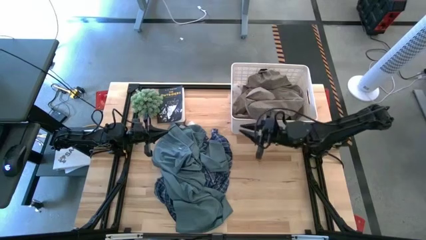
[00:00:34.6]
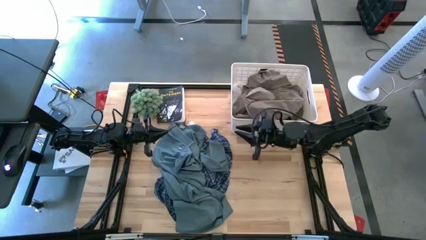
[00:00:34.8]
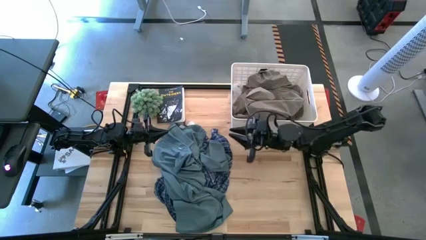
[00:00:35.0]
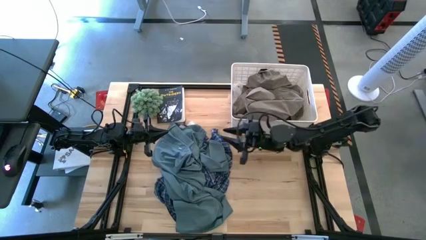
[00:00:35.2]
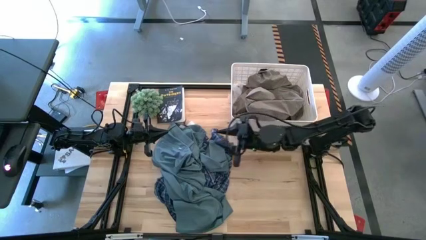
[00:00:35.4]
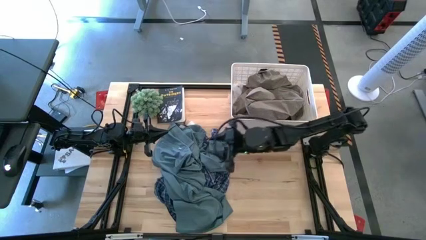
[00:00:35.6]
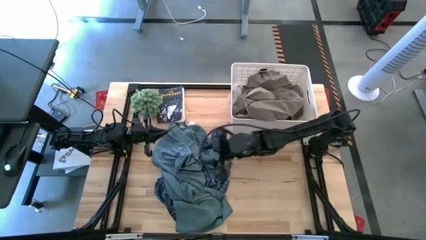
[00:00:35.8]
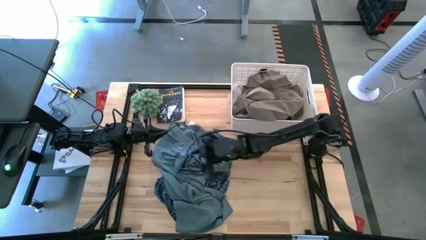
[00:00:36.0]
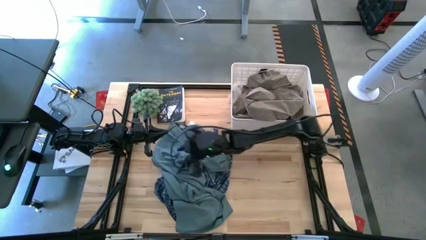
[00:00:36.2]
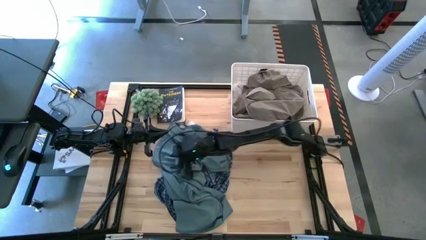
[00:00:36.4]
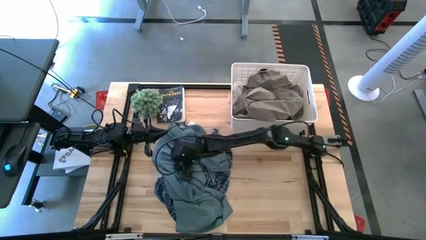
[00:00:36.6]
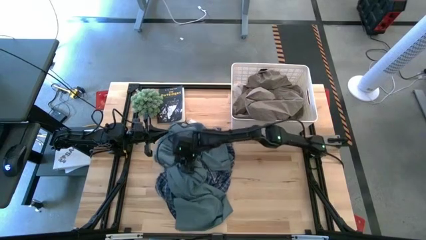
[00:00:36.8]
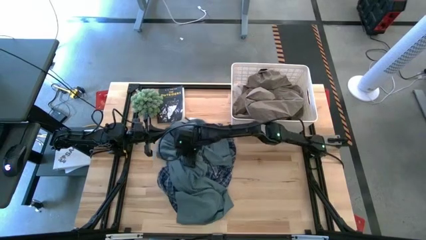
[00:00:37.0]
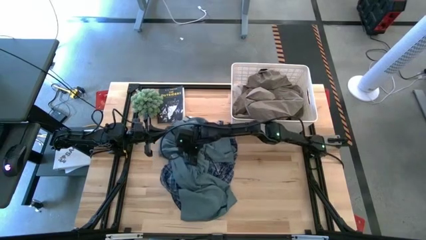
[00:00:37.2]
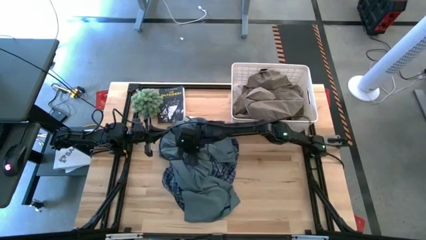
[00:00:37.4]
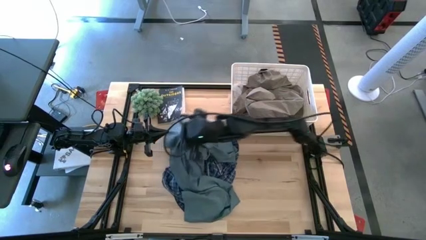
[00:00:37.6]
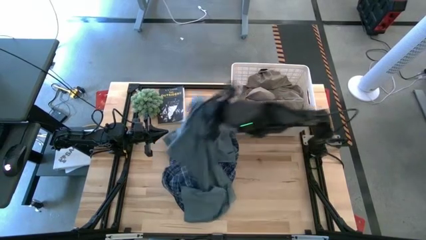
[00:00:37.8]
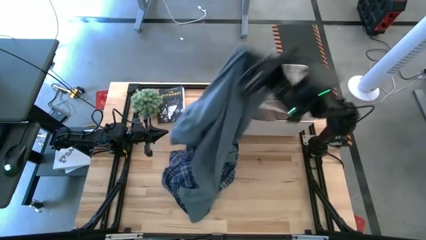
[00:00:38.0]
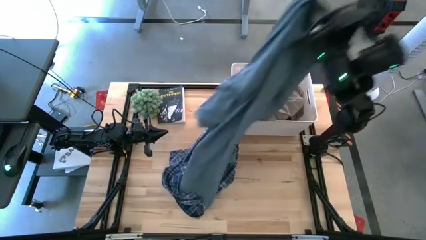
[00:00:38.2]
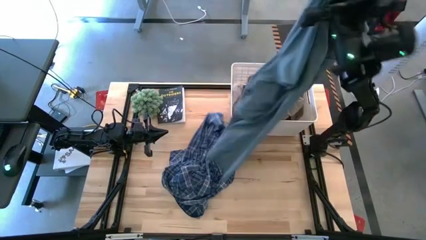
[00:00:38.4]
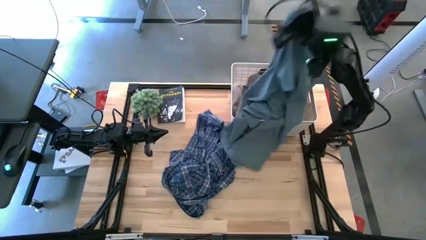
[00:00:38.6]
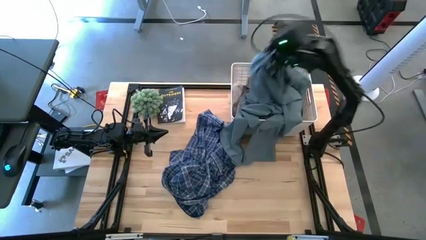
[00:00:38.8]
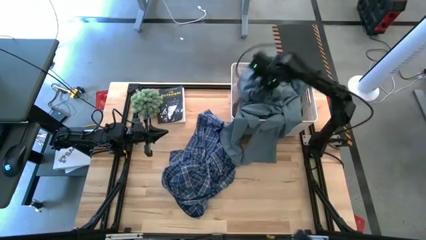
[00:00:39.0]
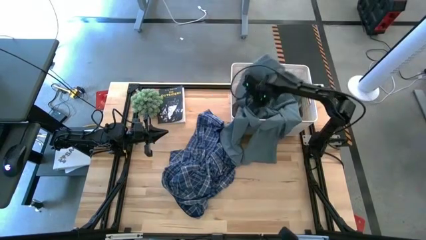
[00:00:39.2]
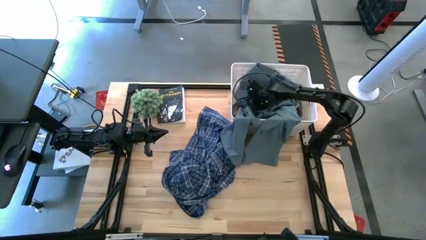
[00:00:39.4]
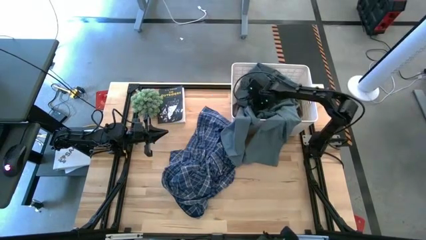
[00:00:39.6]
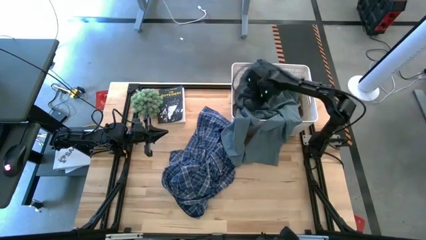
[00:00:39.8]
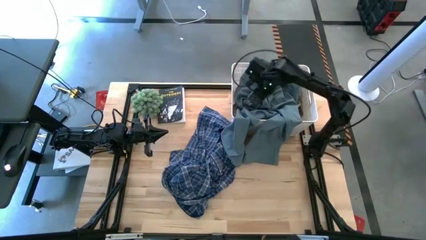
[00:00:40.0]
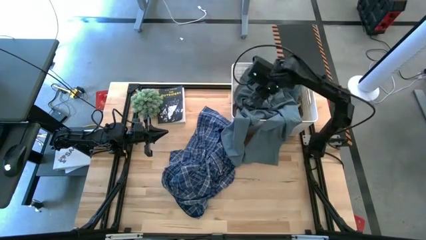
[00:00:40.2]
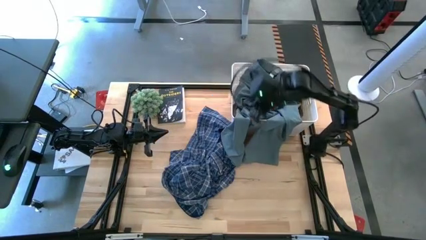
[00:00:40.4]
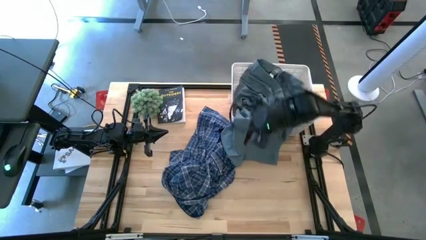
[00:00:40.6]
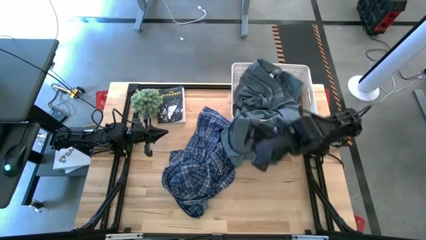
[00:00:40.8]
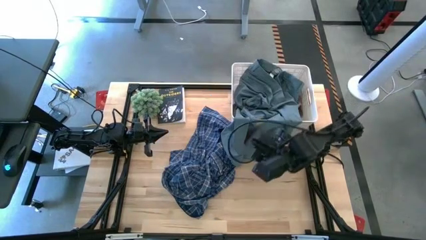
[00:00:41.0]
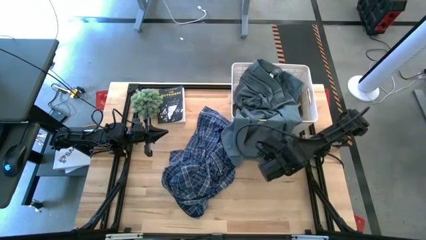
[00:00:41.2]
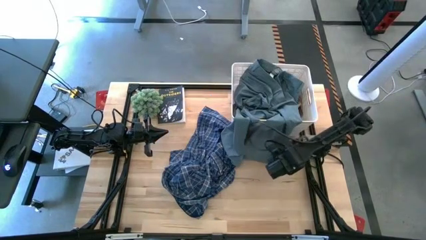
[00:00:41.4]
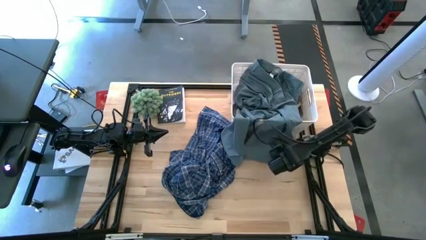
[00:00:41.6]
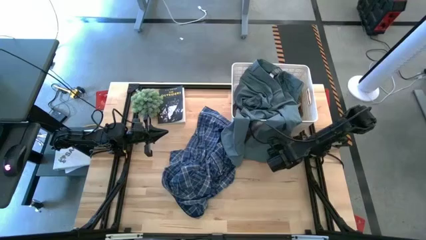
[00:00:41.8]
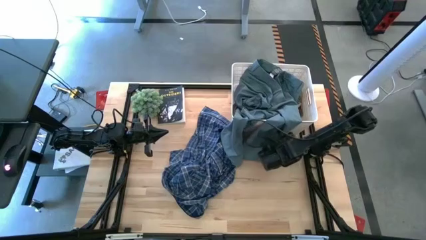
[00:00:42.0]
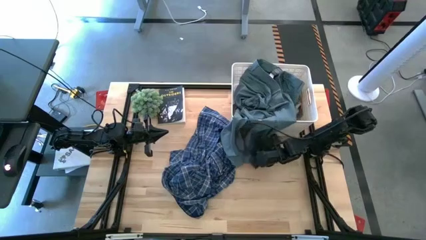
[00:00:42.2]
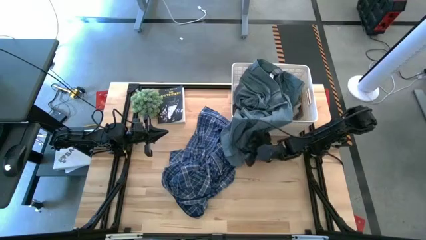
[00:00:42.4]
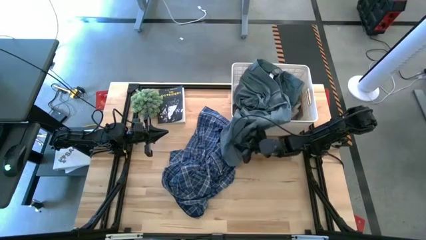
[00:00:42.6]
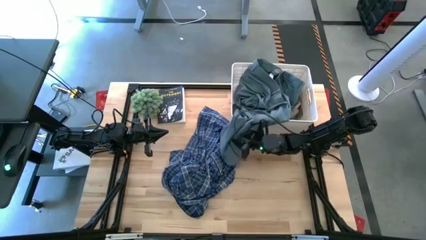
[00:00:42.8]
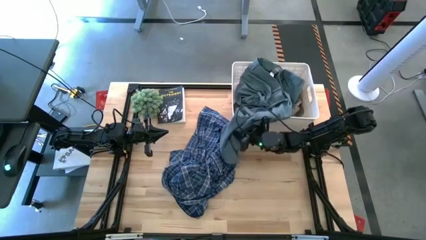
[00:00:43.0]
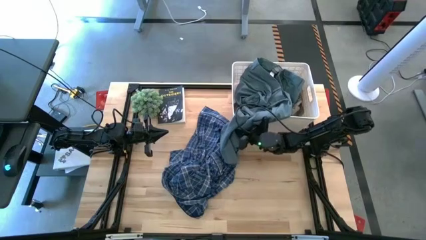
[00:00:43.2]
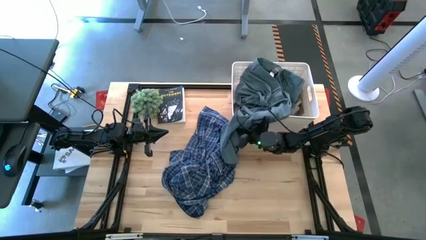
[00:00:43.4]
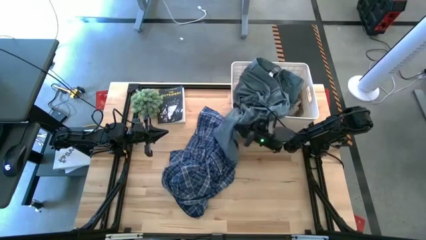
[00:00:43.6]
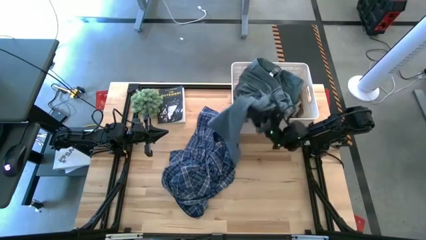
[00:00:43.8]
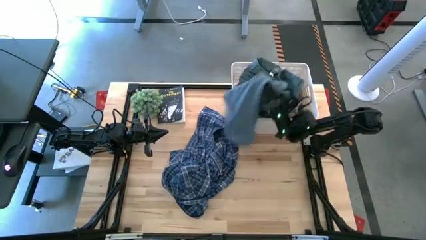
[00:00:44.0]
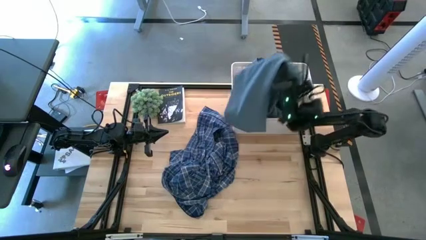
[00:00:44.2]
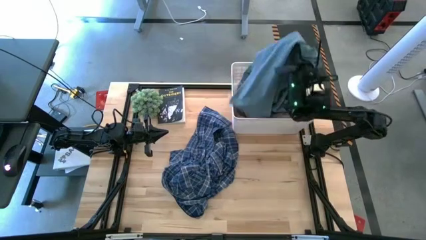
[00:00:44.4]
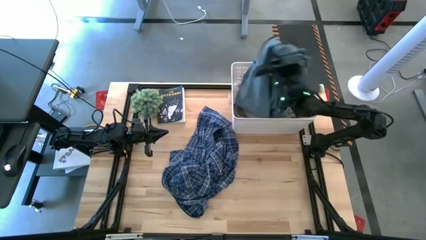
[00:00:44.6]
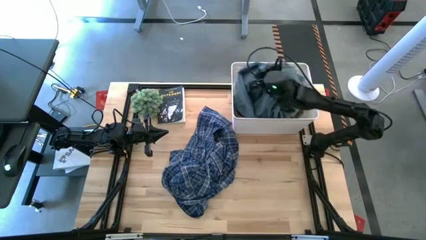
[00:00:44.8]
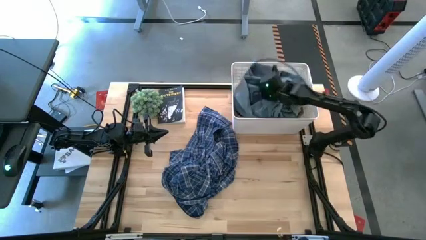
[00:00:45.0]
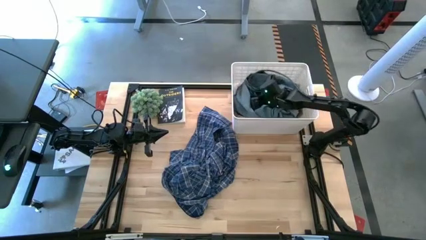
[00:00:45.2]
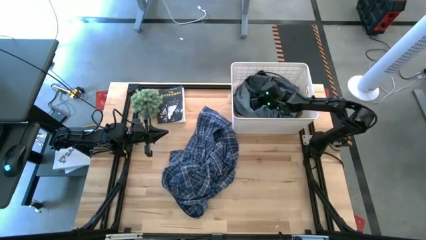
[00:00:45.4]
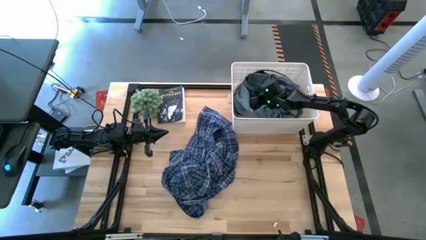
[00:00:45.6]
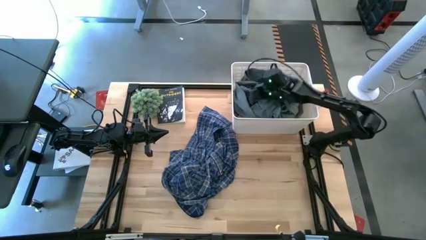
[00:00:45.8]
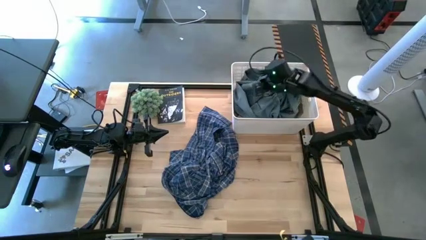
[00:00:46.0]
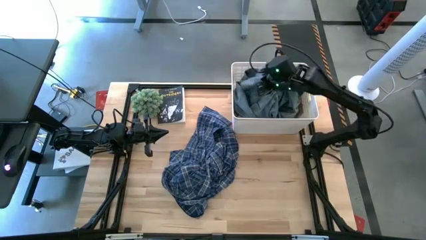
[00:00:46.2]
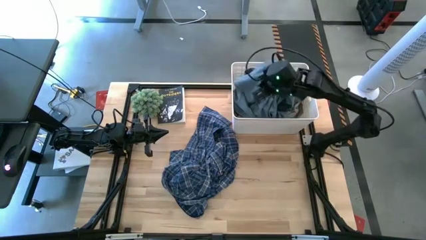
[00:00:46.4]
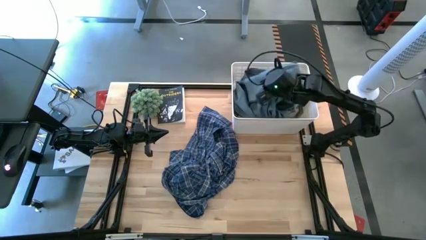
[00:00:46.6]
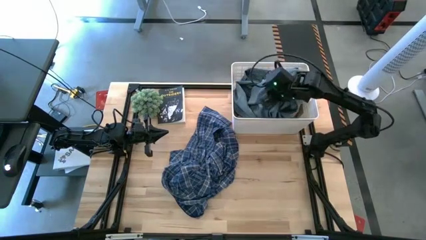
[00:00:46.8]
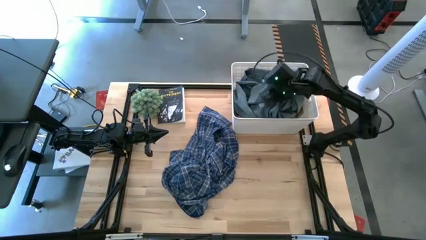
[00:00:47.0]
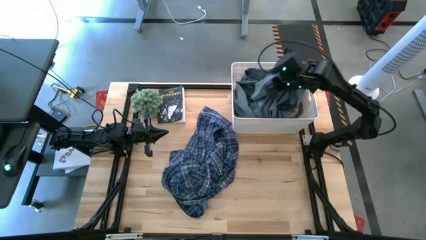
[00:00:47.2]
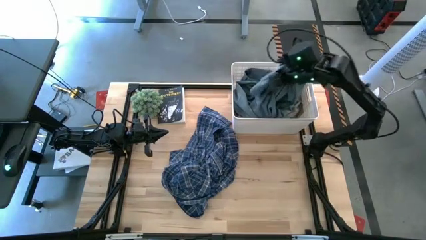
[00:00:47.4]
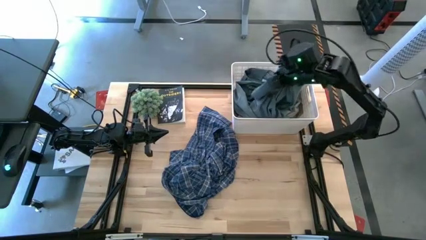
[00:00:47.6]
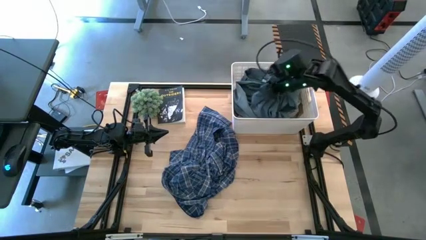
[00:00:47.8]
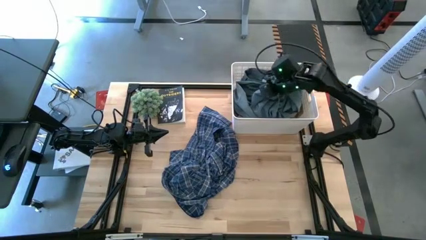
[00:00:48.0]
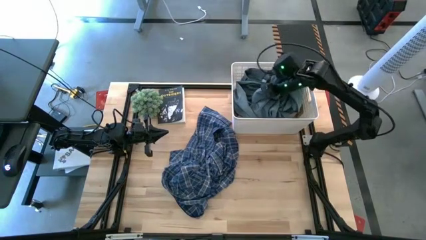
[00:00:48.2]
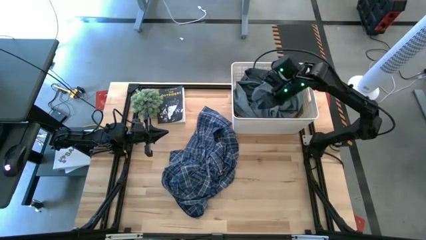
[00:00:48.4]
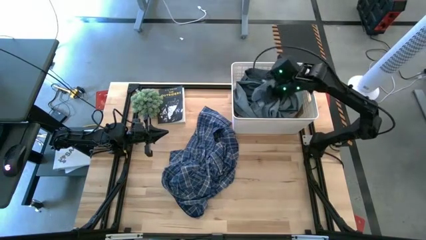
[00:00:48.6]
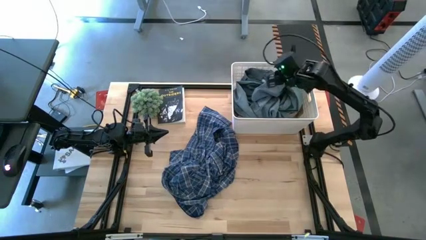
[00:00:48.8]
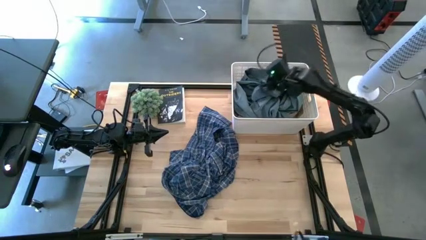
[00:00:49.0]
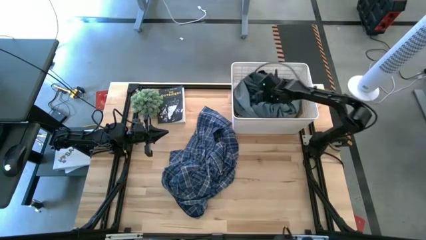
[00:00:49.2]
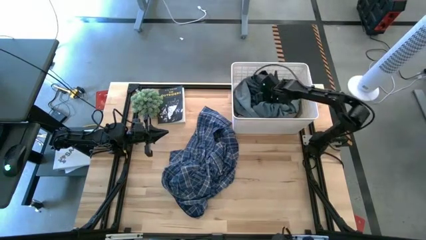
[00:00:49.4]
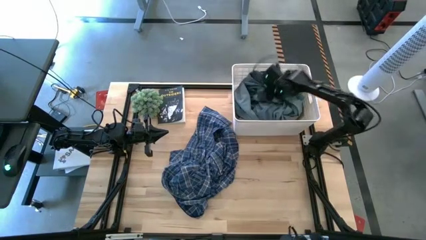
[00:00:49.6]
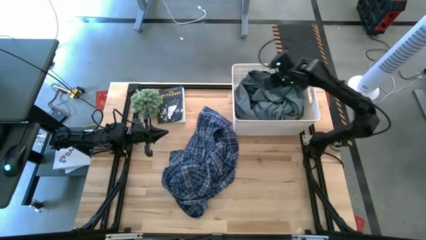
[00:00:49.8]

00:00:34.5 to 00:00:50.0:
Task: Sort clothes
Put the blue pants into the white laundry organizer
